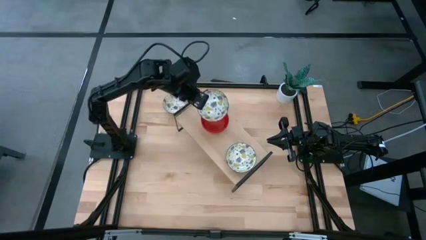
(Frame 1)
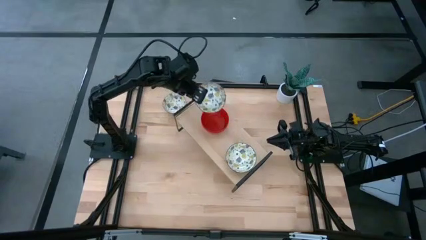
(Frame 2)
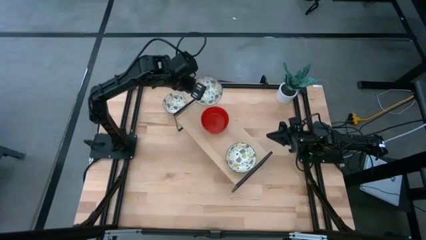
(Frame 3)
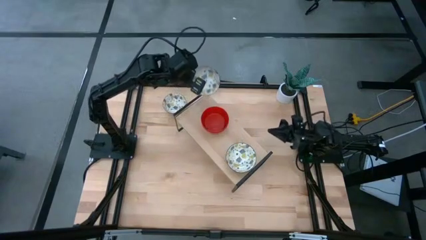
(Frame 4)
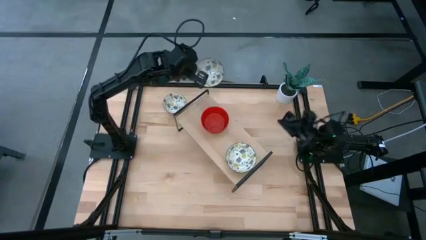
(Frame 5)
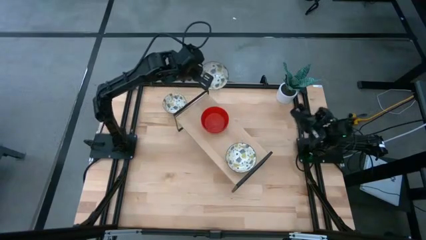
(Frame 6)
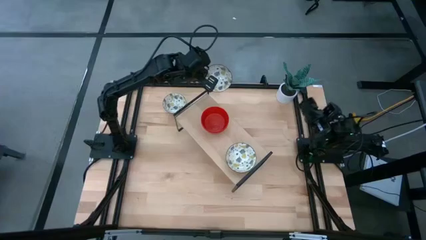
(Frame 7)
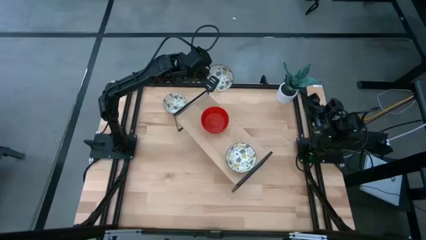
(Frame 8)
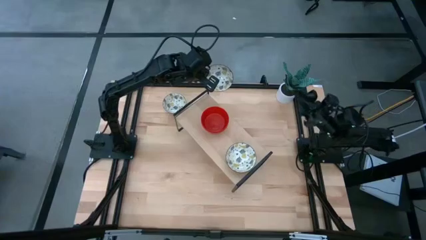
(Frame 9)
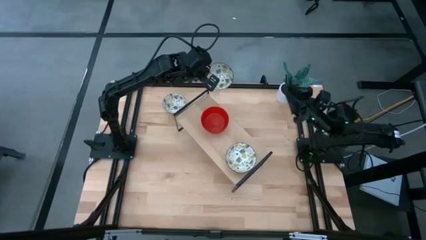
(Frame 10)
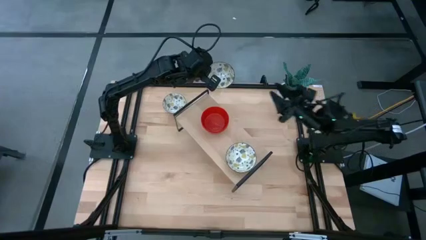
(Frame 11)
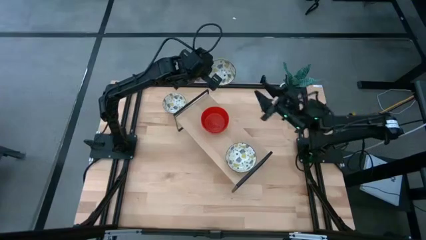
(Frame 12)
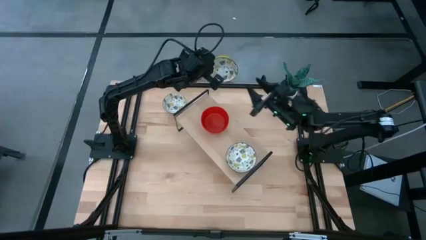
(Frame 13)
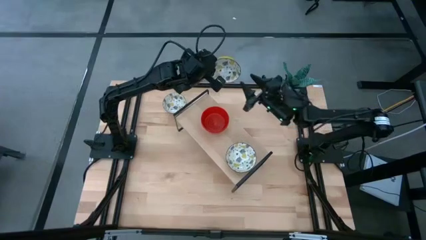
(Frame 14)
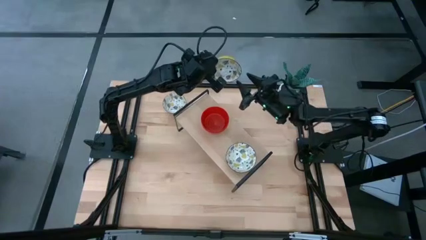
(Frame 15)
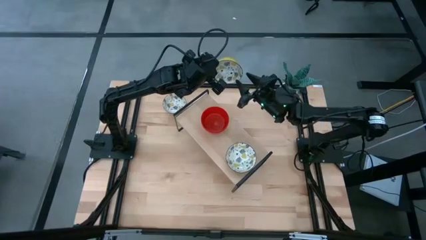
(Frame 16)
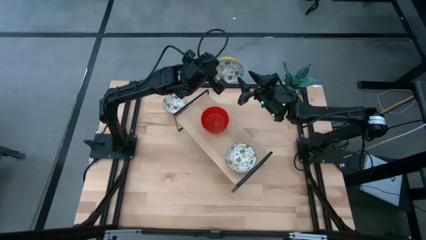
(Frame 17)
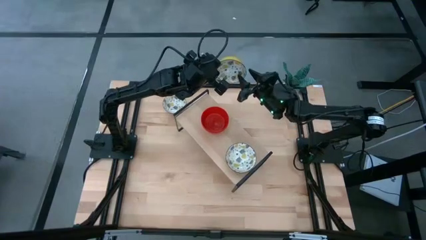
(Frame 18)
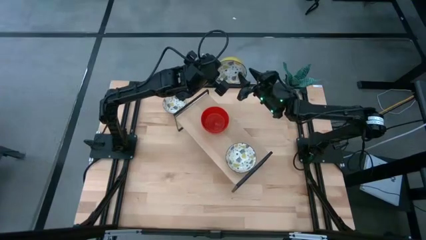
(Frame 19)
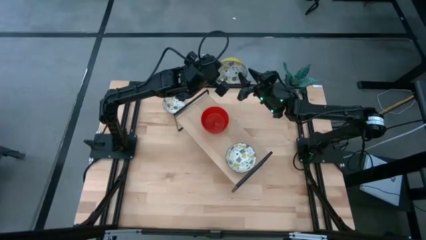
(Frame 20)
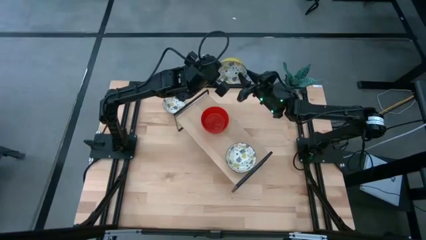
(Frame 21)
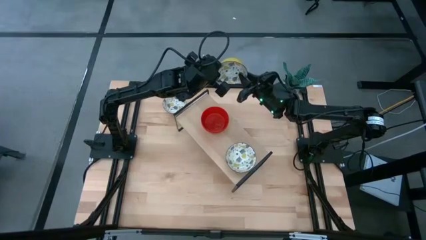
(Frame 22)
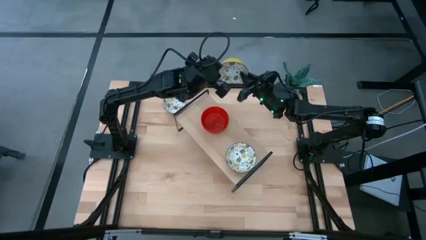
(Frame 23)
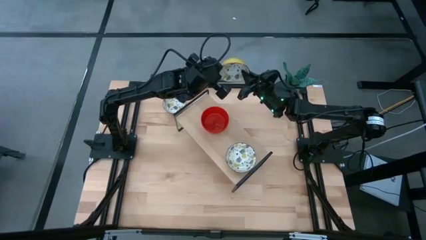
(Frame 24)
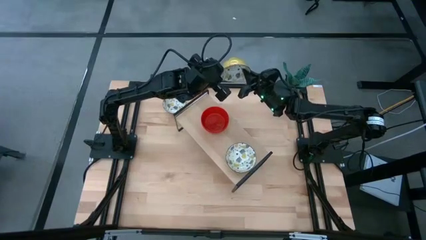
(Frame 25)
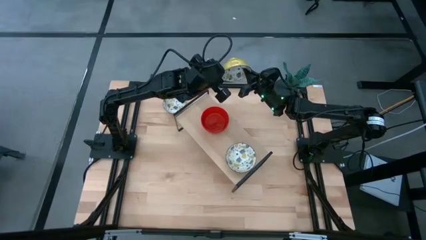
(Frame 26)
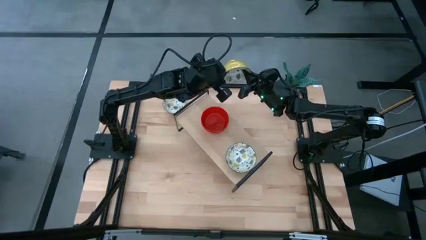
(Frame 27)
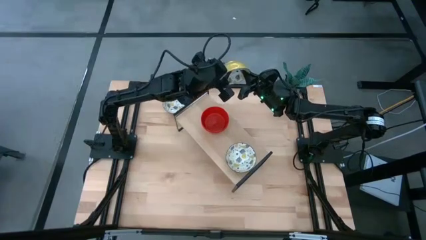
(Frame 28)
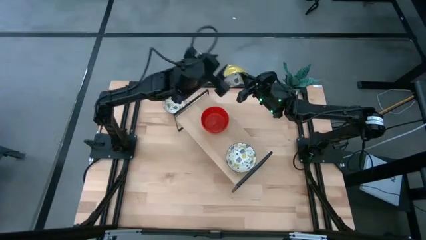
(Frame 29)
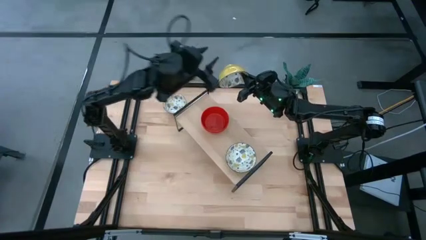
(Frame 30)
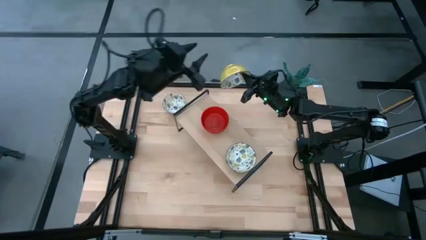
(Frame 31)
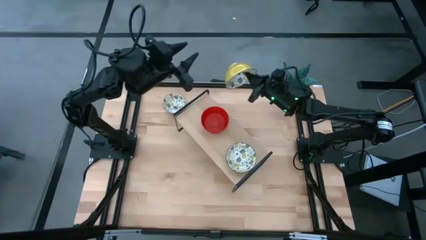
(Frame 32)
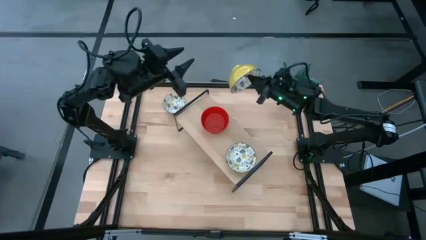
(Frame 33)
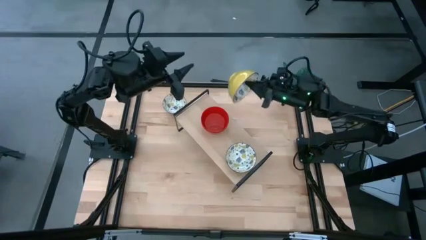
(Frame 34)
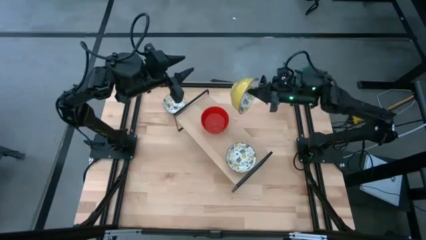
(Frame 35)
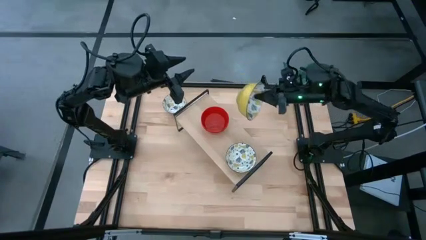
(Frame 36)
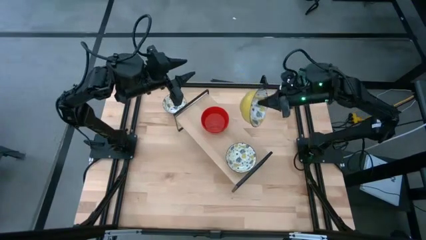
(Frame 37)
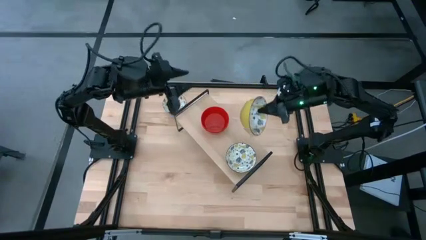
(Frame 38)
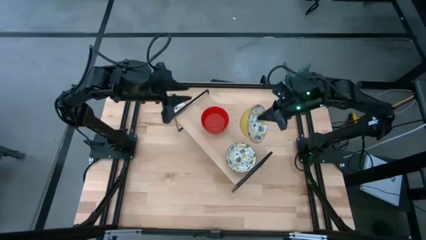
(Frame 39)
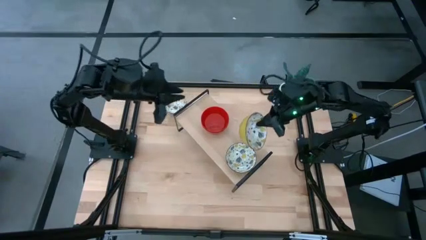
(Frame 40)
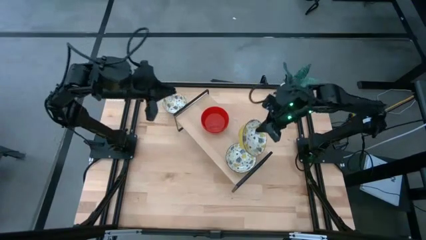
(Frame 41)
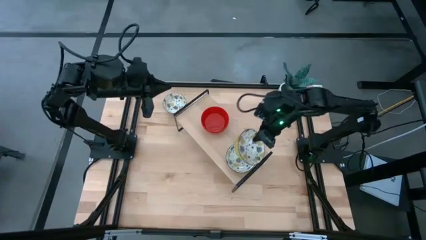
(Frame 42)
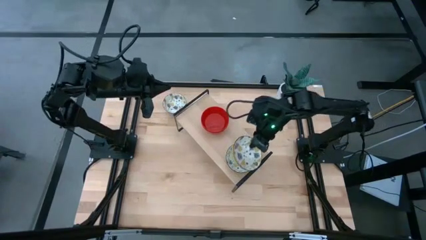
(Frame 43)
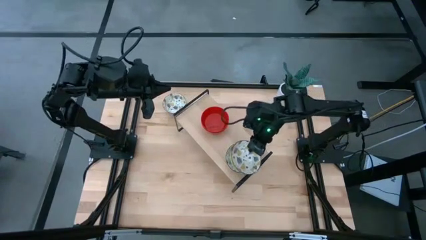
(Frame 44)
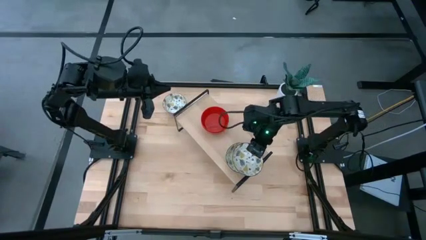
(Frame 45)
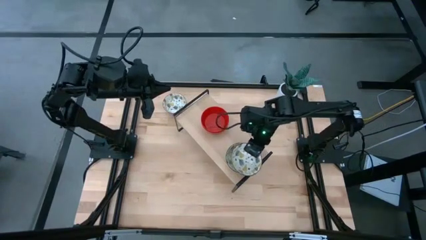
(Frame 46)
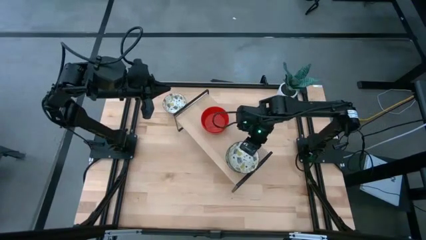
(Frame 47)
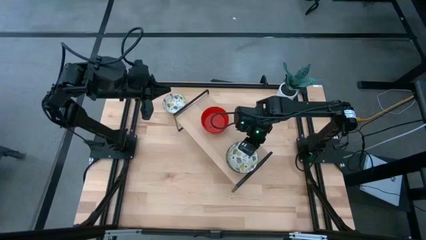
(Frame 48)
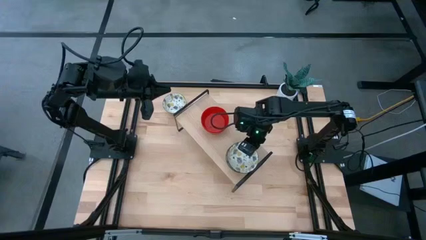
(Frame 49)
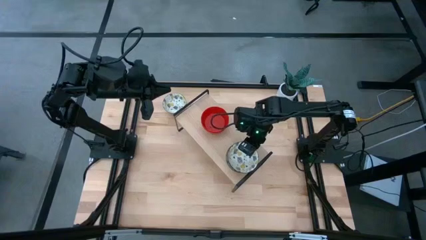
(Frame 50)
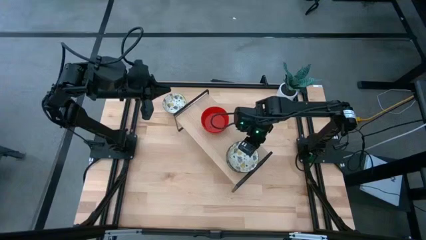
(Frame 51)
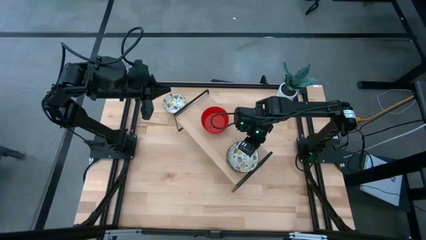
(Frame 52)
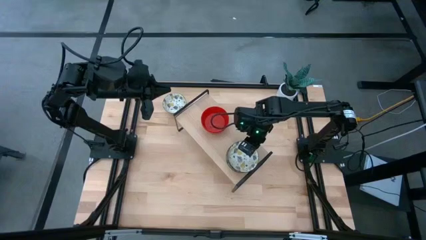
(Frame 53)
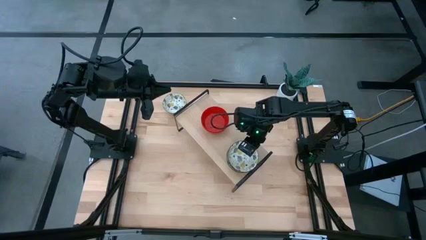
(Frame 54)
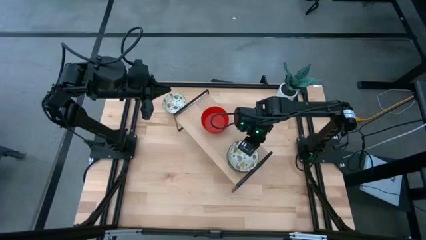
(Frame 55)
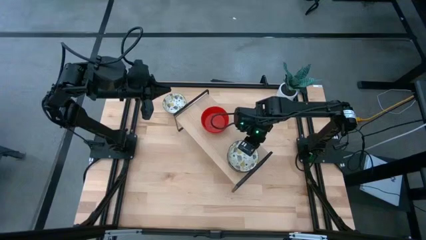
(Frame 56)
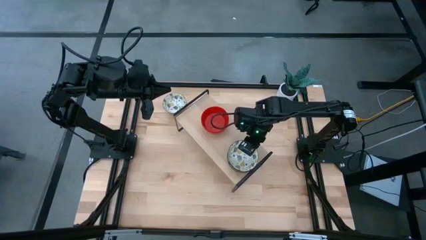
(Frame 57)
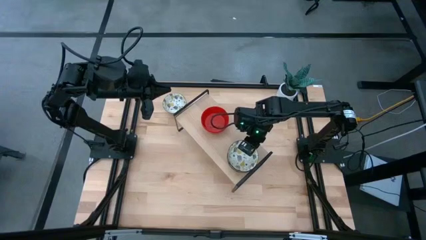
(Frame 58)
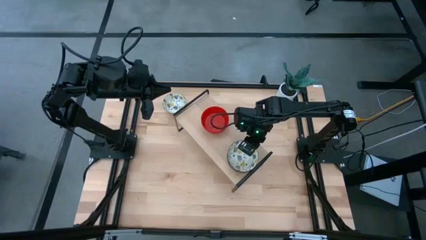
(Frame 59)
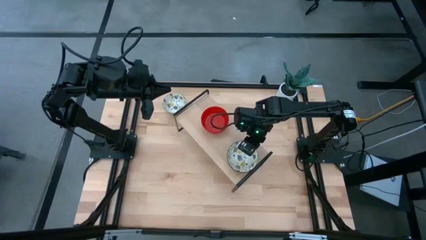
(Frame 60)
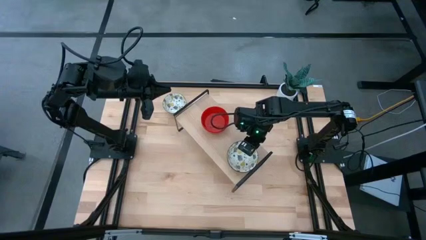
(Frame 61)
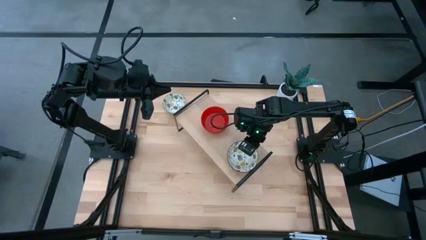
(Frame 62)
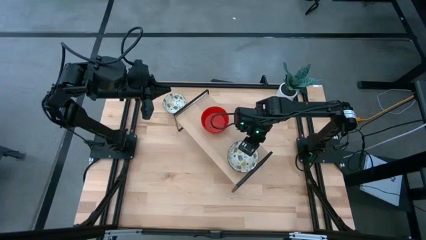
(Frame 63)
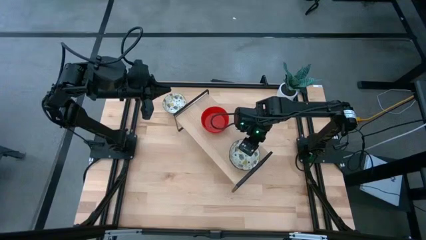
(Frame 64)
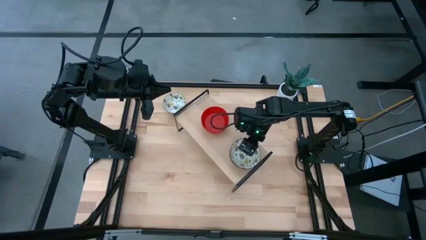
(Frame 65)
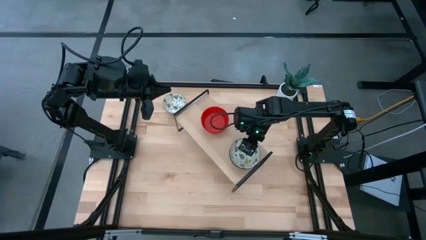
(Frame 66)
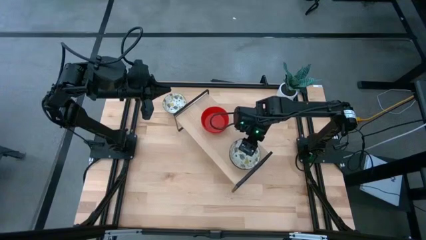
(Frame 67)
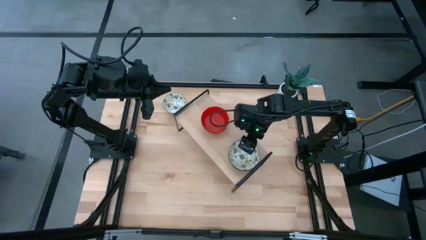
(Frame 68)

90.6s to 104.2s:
Task: Pick & Place Mini bowls
Stack the bottom white patterned bowl on top of the white patterned bowl on the shelf
